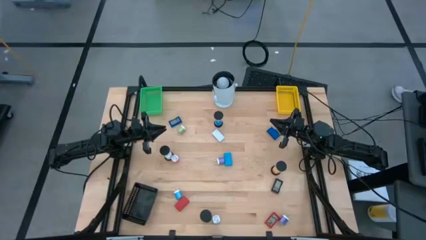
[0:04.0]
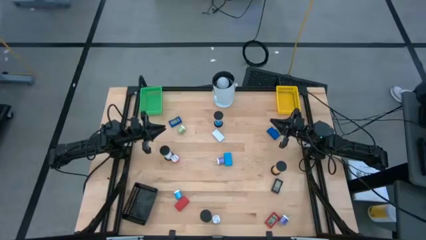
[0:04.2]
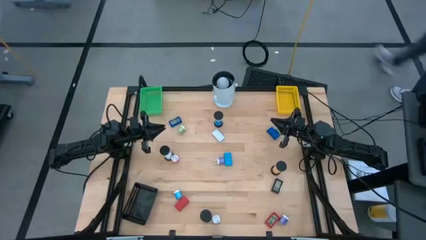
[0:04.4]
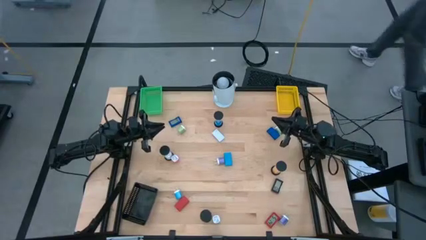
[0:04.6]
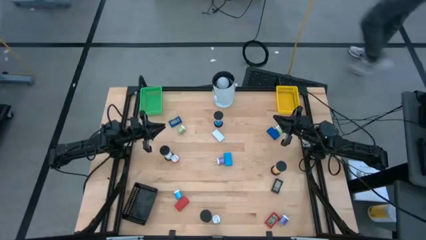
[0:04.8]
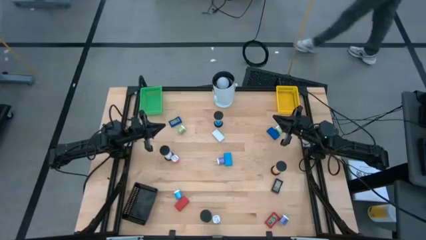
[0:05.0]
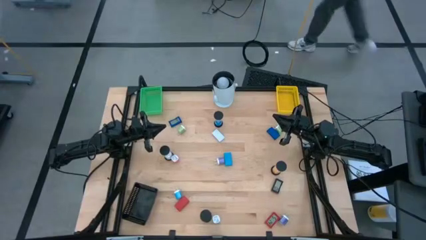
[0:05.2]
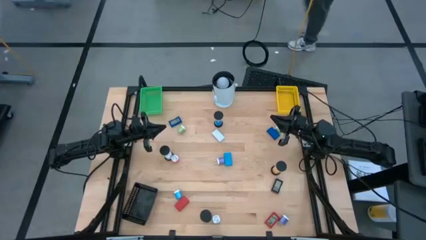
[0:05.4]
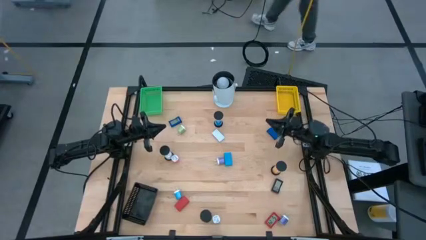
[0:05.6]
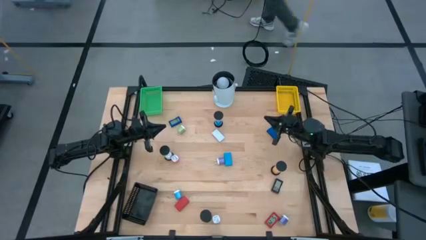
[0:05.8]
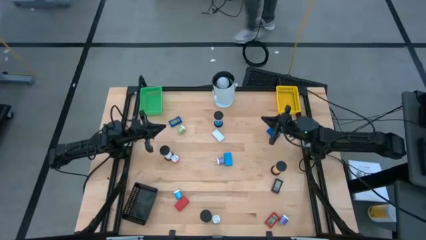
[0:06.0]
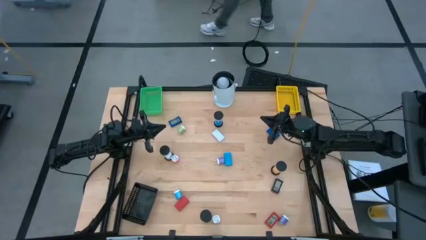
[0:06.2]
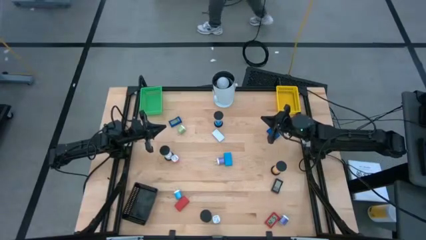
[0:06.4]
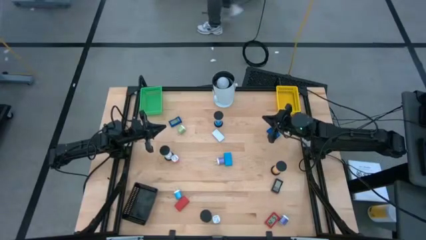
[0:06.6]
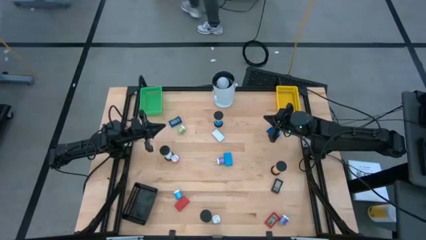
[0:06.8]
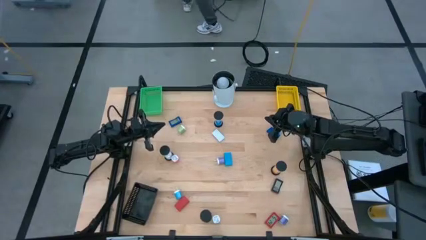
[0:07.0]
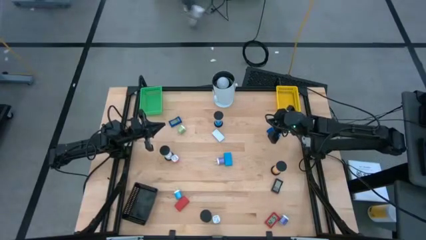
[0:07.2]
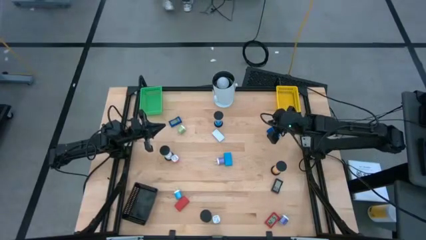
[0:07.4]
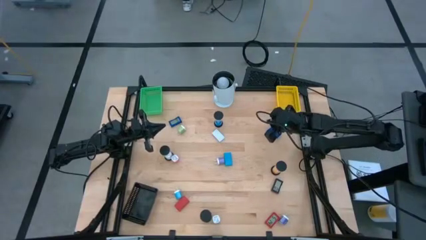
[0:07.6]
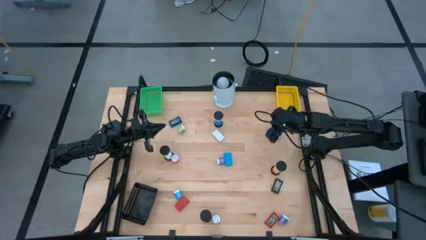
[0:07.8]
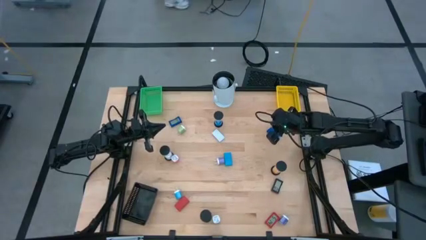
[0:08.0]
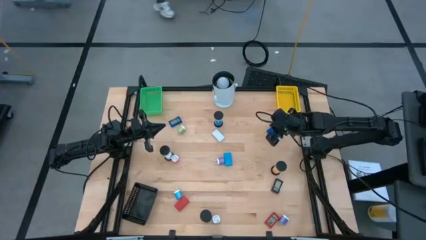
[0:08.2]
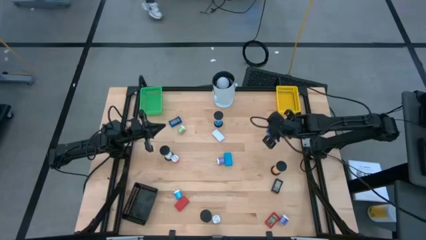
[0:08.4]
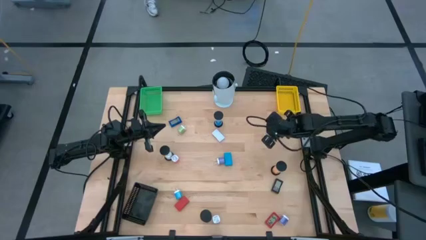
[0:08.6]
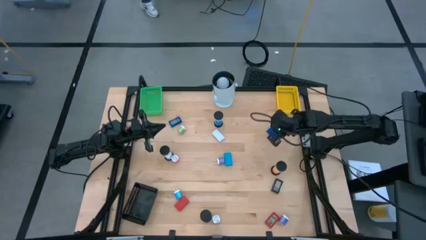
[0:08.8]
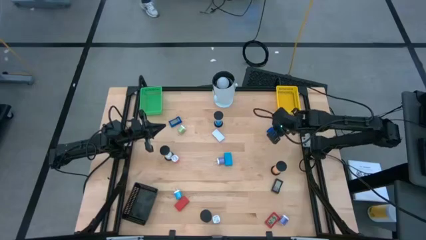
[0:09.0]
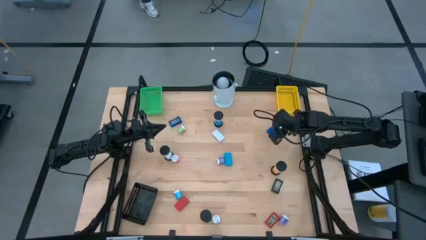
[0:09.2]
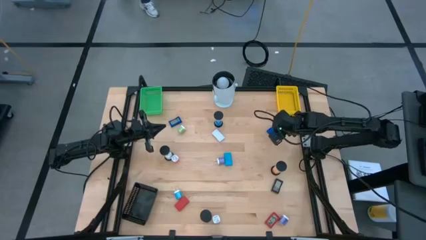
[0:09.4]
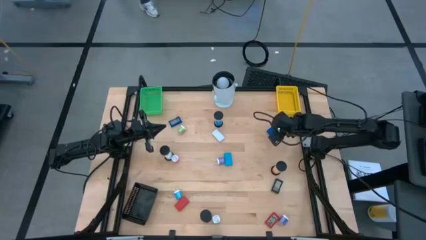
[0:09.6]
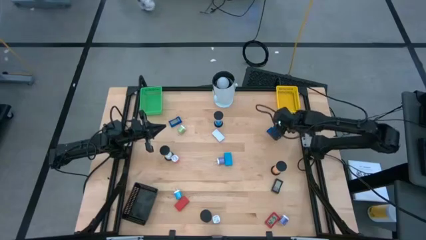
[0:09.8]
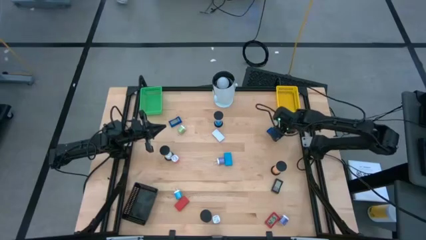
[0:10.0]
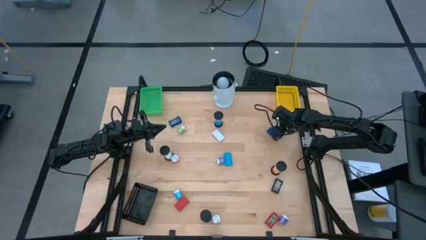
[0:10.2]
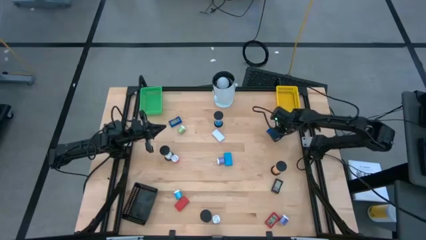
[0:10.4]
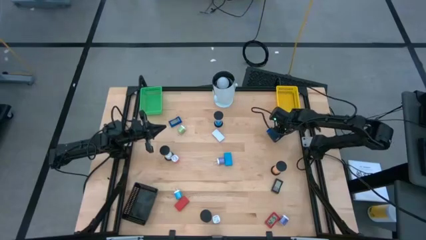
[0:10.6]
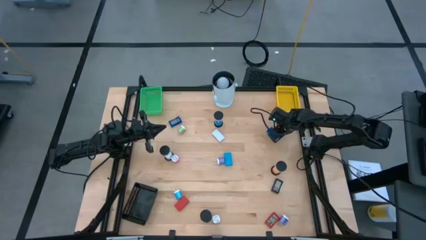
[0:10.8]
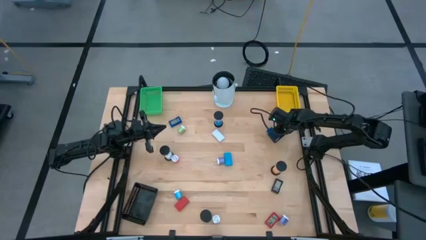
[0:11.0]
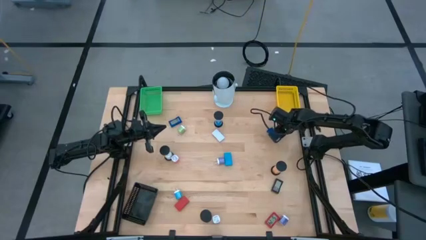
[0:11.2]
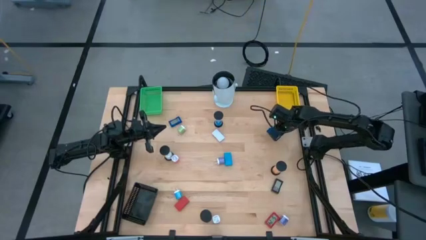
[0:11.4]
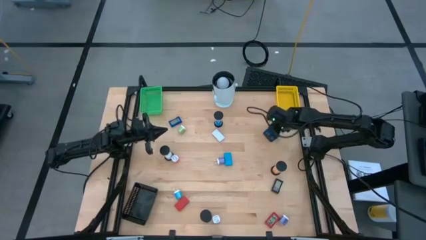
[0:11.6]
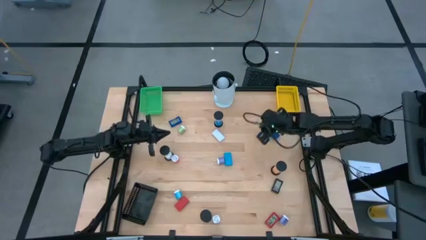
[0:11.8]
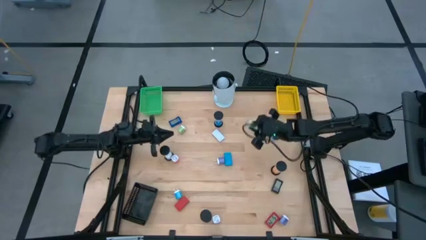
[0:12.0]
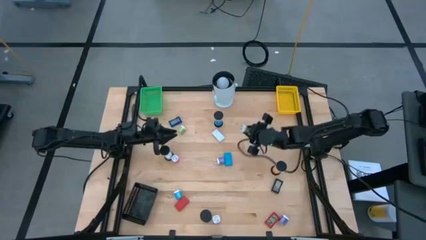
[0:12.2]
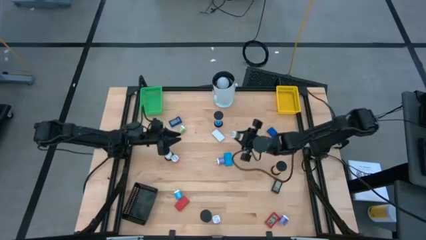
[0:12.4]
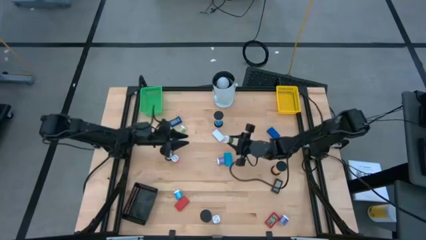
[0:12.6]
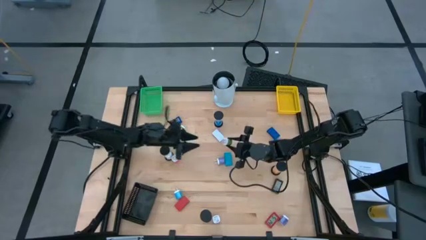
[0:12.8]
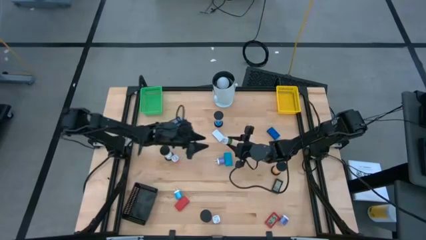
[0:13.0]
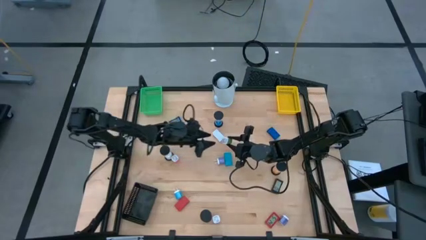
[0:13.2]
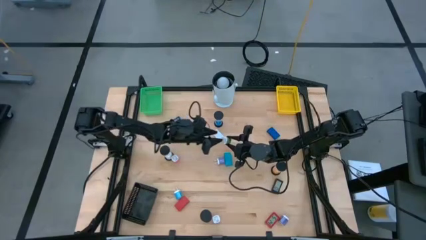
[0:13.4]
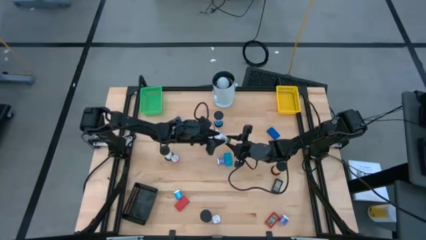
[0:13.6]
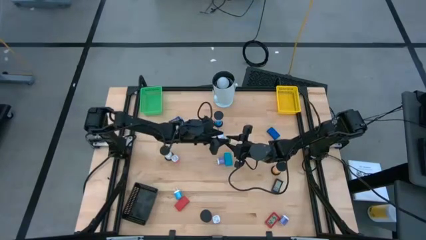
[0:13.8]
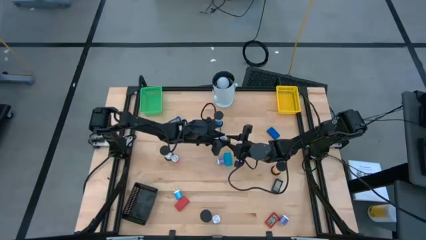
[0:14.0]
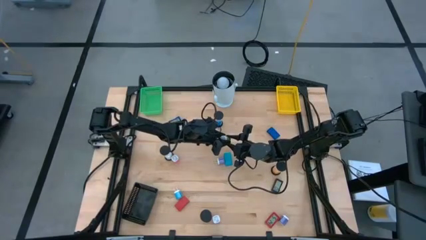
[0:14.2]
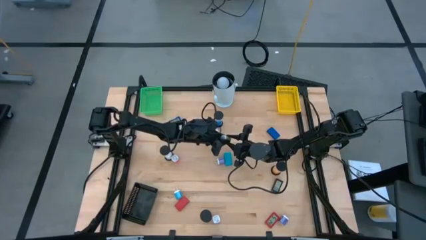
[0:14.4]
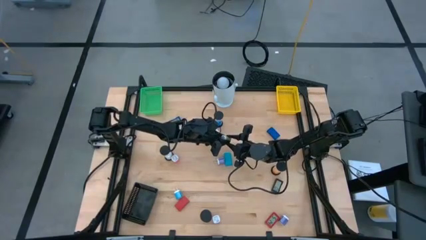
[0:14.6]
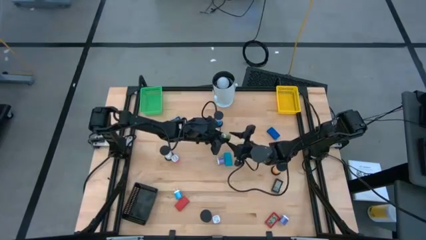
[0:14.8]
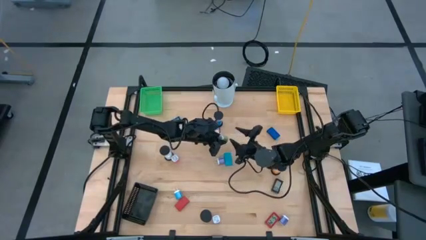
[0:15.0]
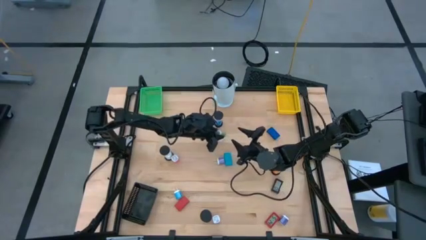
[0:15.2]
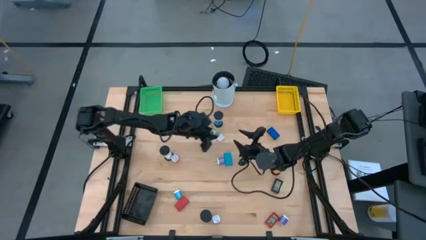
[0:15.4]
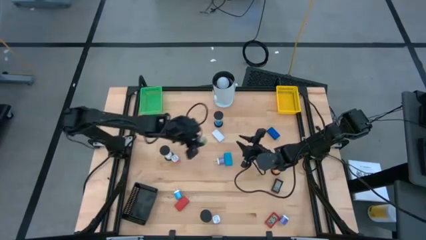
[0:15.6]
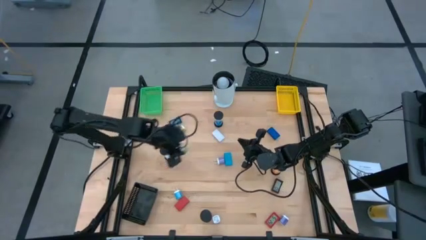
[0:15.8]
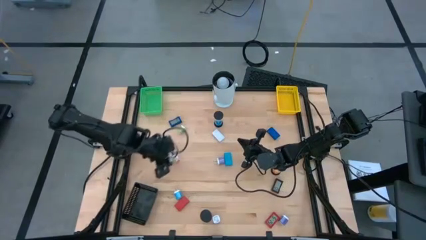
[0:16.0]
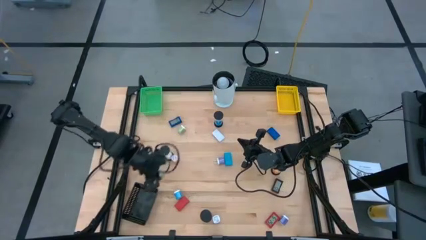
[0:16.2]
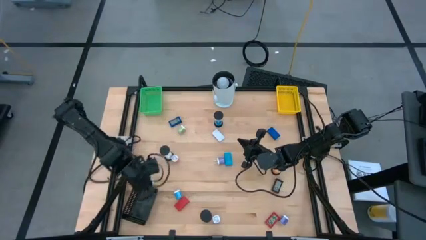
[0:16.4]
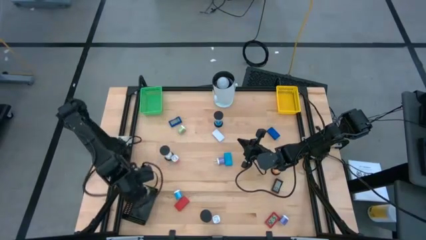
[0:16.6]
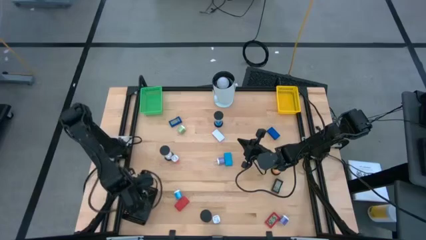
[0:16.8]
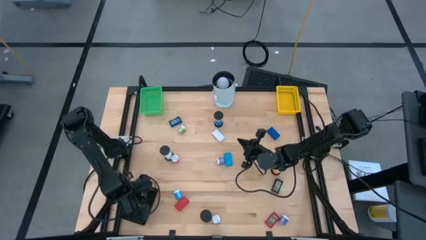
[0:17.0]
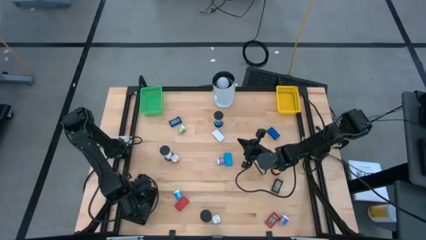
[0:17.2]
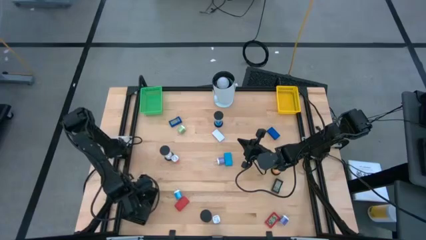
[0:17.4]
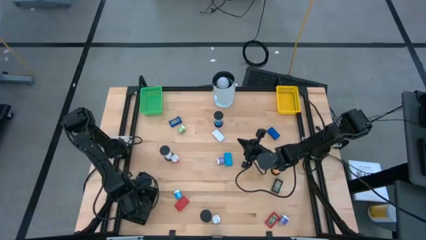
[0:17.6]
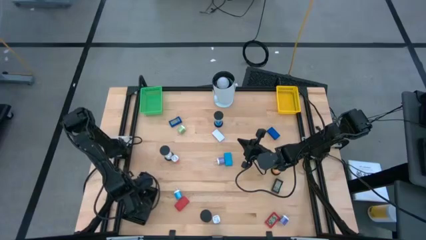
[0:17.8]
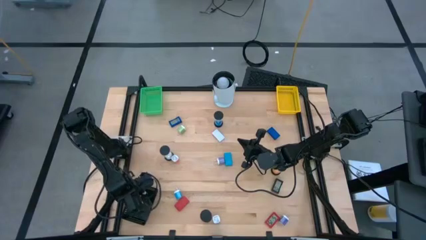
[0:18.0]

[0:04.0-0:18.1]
Task: Pick & Place Office items
Put the right green charger adapter into the black bin
